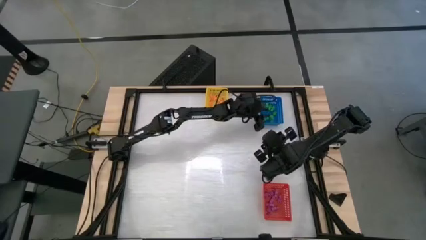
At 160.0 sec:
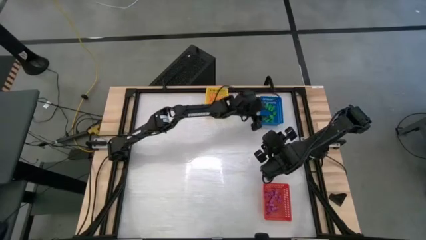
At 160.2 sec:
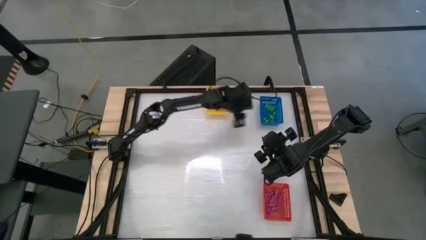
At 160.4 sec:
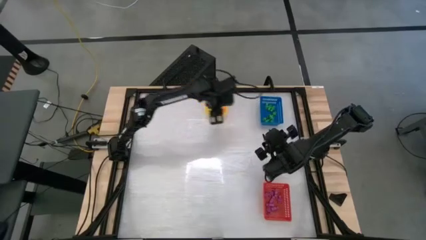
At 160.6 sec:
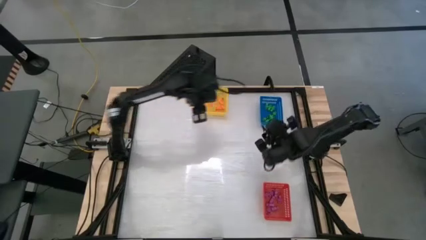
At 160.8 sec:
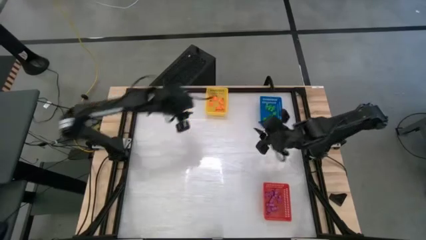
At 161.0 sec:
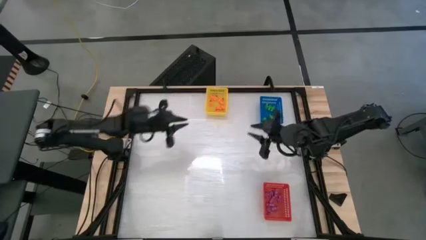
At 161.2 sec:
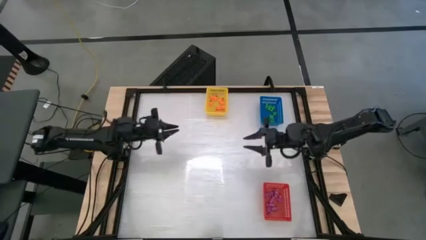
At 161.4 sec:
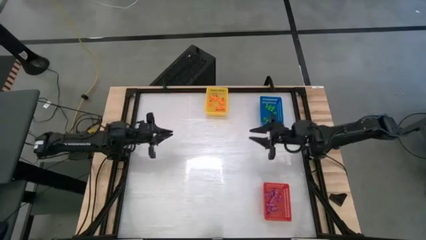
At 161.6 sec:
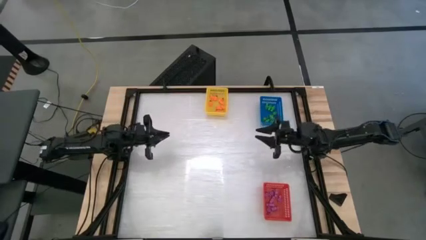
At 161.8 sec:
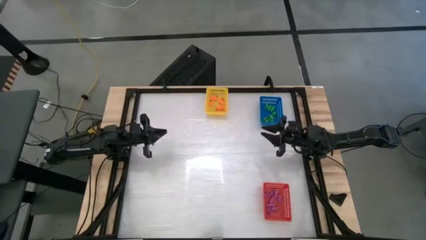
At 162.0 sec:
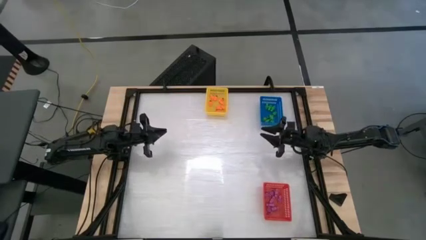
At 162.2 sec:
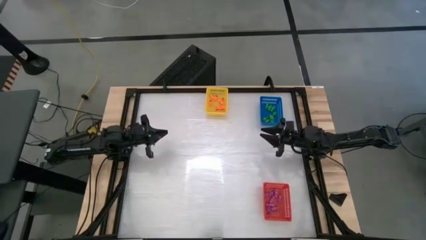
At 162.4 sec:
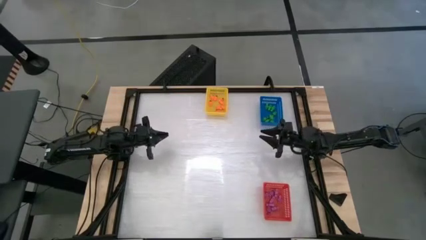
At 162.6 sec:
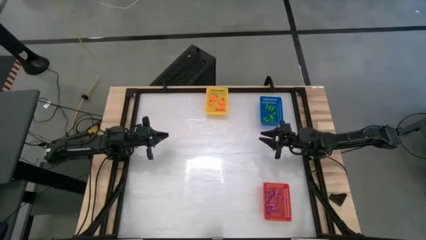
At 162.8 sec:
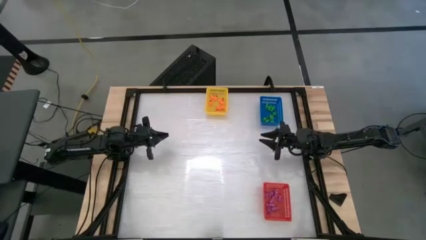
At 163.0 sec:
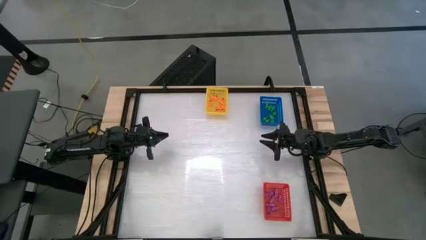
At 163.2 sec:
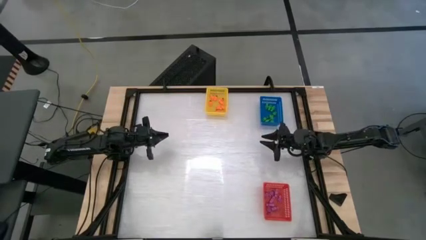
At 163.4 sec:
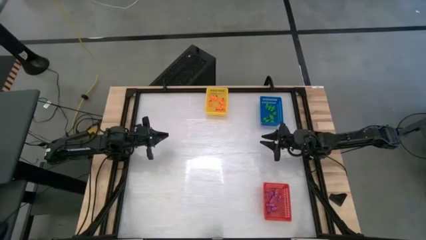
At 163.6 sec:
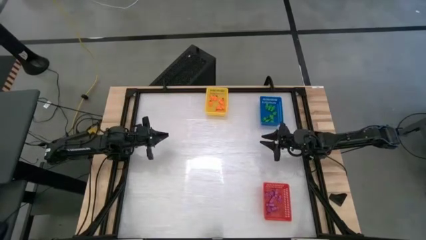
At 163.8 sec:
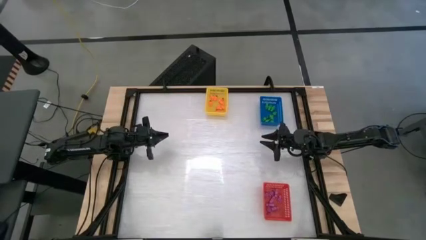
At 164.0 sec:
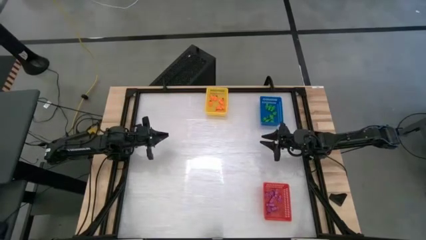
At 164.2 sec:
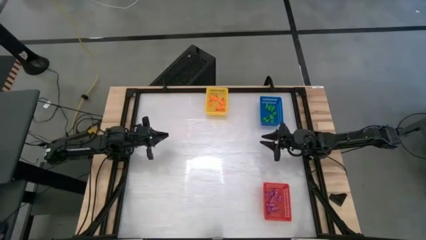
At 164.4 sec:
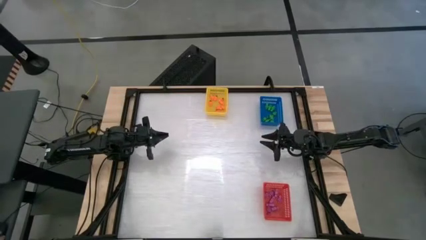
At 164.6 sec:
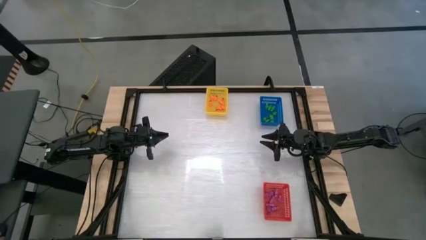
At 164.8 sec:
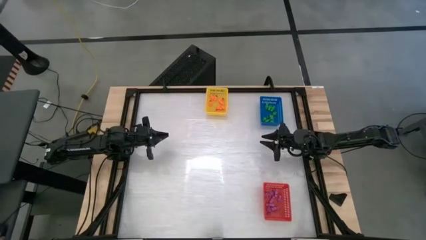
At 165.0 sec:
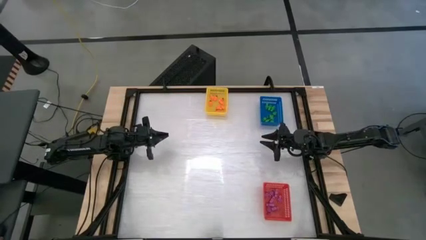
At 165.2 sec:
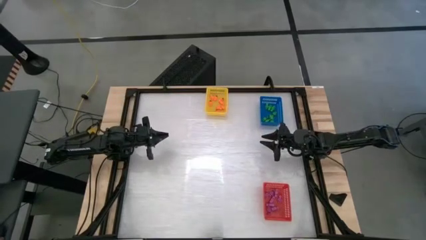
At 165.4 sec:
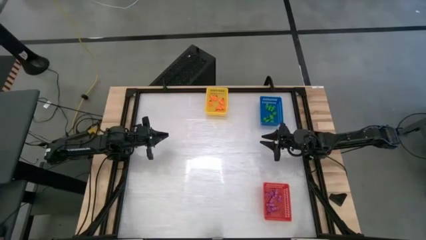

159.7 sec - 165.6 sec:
Task: Sort Halloween decoration
Return to Home Position

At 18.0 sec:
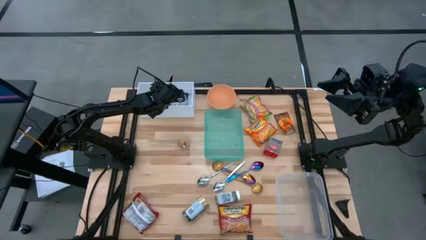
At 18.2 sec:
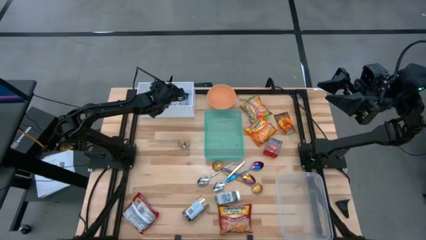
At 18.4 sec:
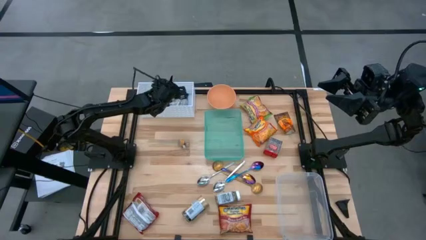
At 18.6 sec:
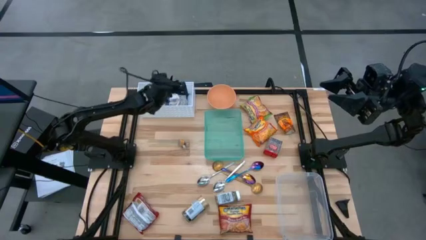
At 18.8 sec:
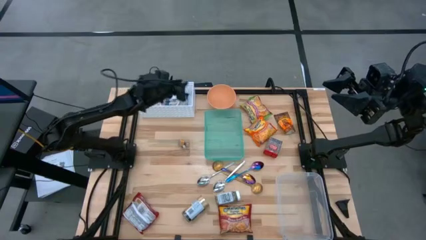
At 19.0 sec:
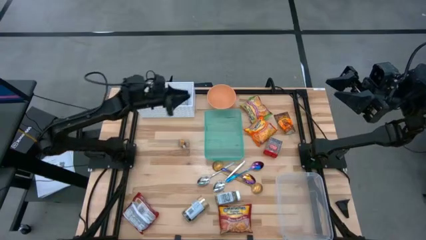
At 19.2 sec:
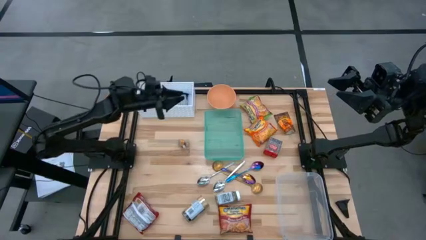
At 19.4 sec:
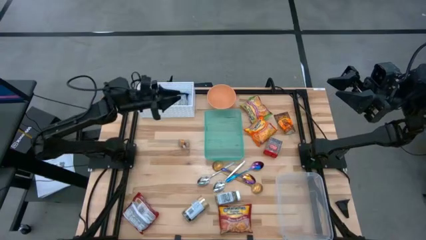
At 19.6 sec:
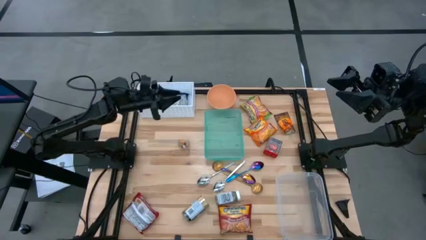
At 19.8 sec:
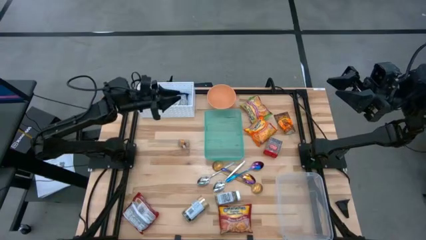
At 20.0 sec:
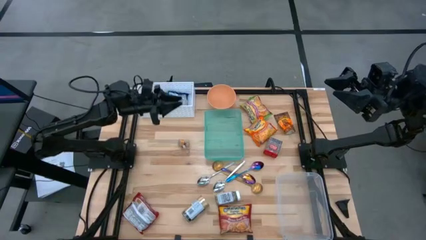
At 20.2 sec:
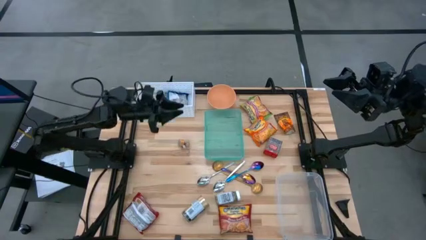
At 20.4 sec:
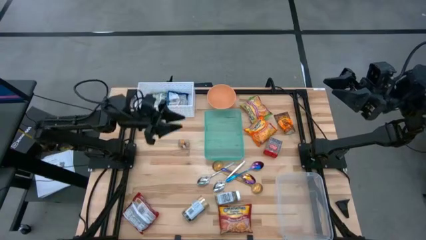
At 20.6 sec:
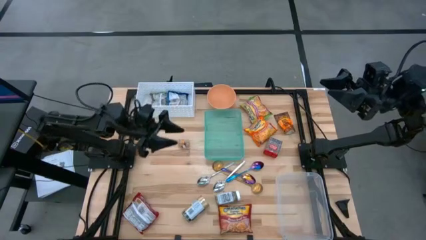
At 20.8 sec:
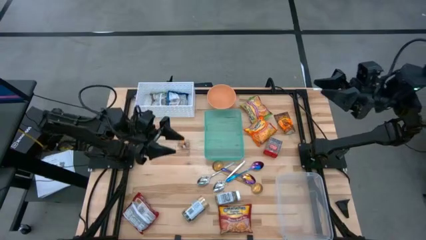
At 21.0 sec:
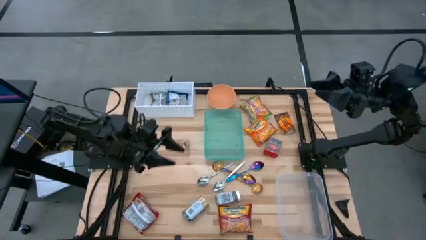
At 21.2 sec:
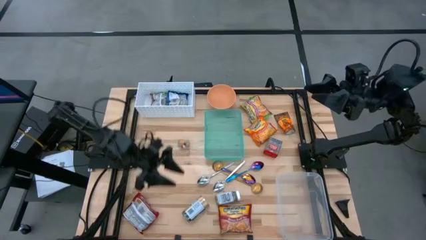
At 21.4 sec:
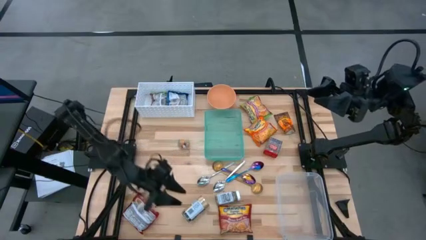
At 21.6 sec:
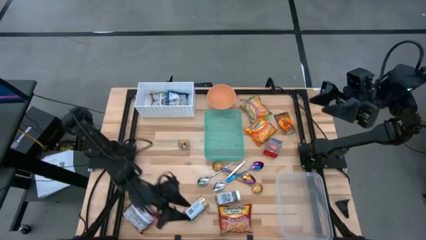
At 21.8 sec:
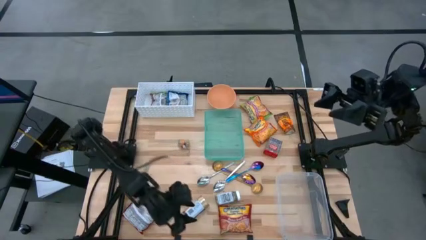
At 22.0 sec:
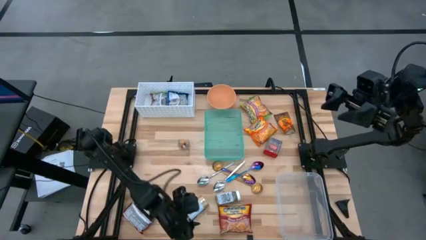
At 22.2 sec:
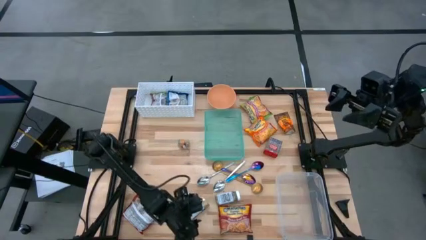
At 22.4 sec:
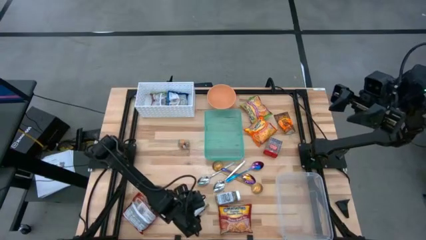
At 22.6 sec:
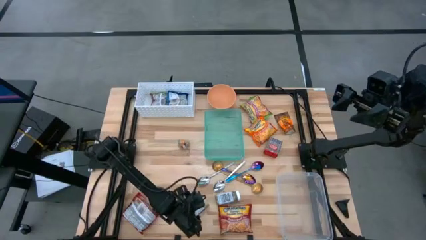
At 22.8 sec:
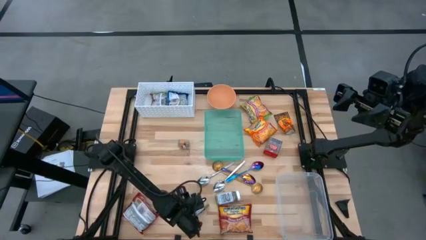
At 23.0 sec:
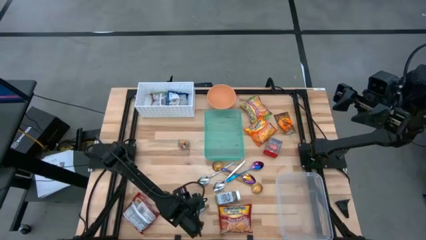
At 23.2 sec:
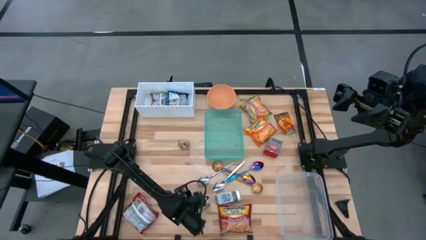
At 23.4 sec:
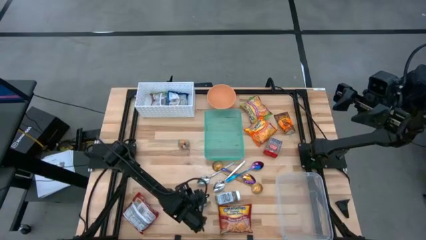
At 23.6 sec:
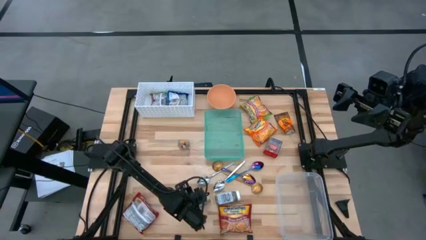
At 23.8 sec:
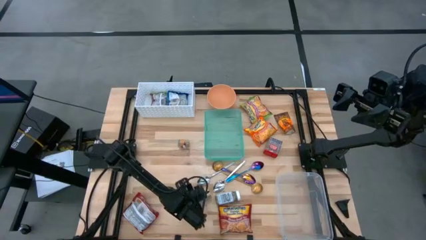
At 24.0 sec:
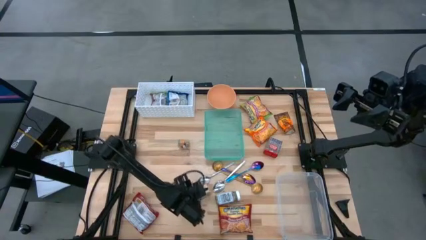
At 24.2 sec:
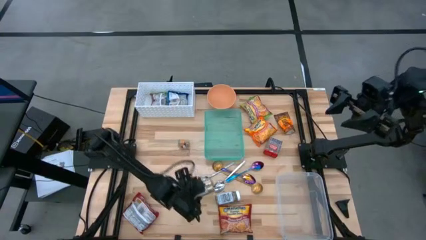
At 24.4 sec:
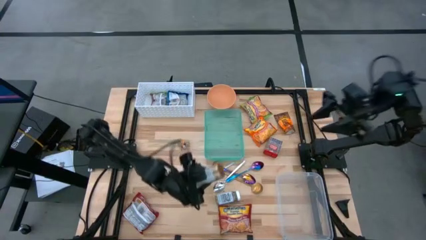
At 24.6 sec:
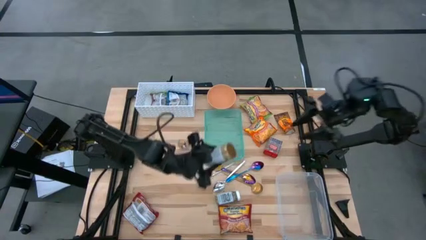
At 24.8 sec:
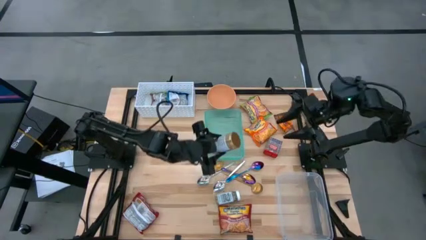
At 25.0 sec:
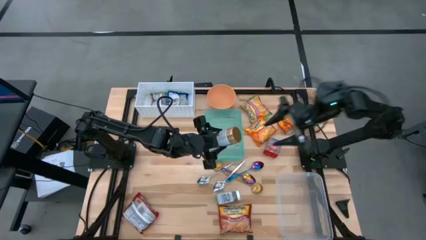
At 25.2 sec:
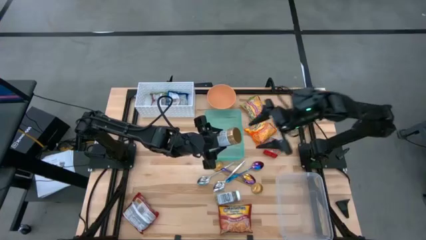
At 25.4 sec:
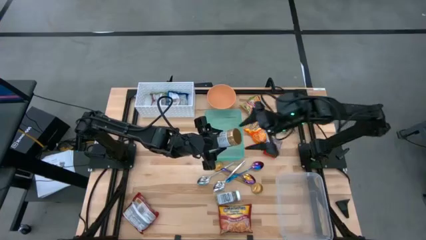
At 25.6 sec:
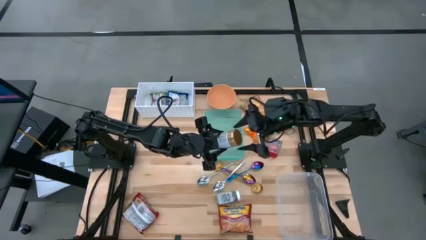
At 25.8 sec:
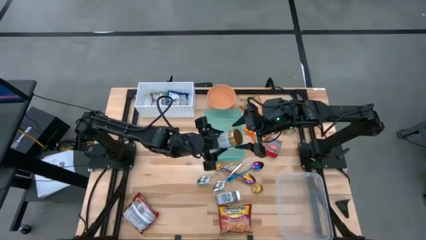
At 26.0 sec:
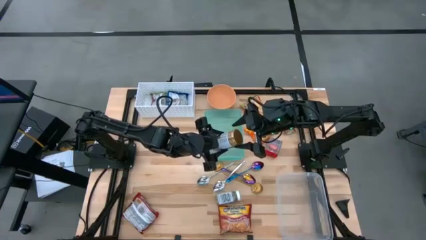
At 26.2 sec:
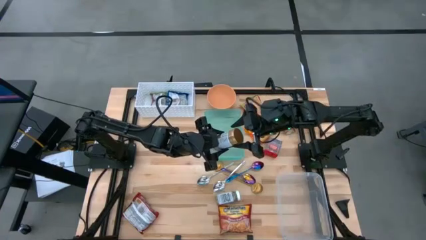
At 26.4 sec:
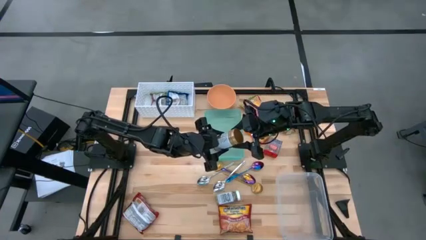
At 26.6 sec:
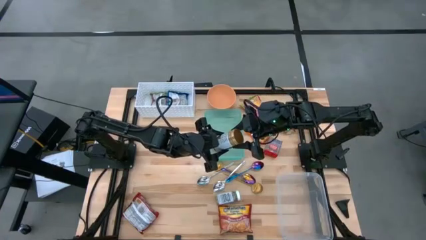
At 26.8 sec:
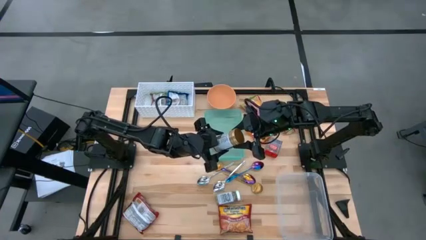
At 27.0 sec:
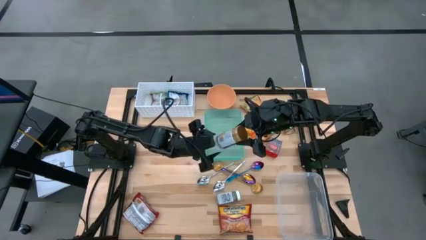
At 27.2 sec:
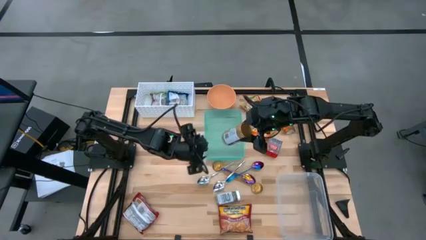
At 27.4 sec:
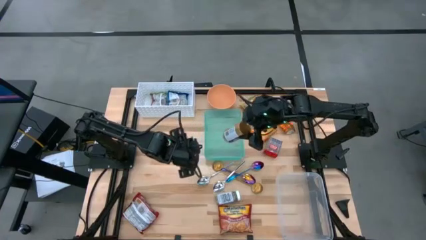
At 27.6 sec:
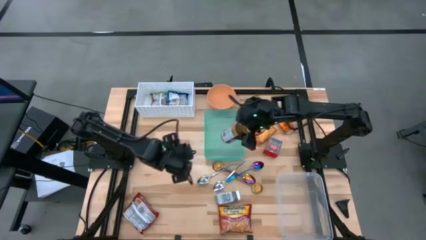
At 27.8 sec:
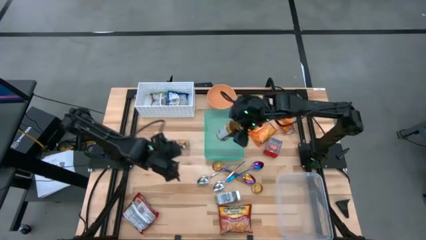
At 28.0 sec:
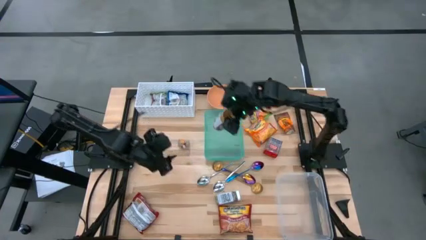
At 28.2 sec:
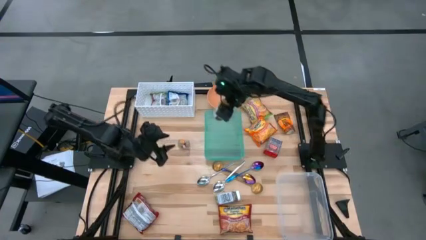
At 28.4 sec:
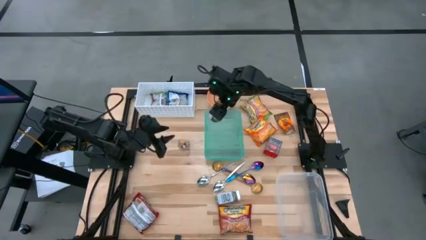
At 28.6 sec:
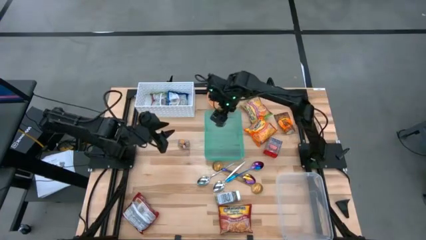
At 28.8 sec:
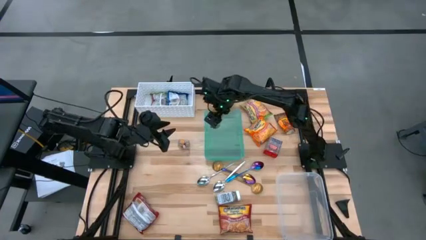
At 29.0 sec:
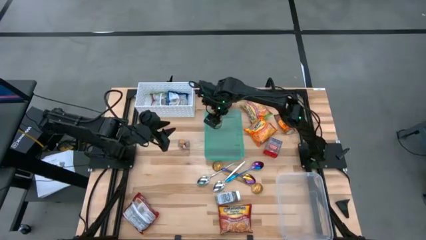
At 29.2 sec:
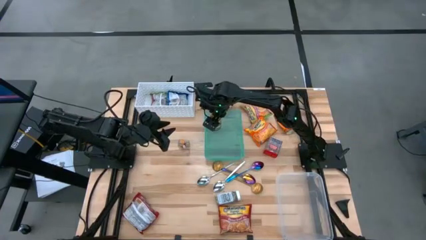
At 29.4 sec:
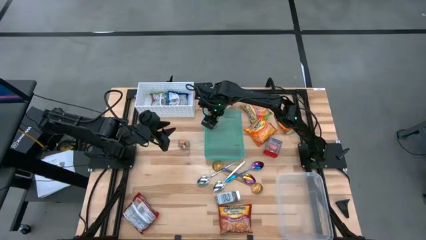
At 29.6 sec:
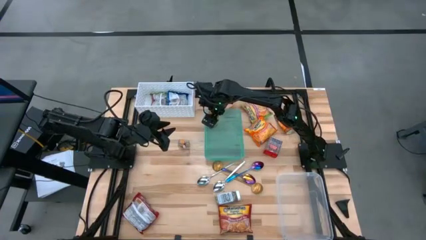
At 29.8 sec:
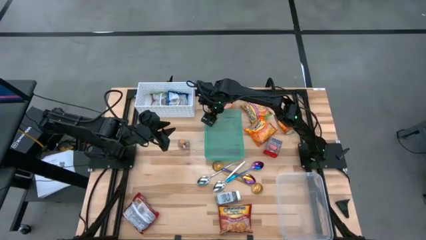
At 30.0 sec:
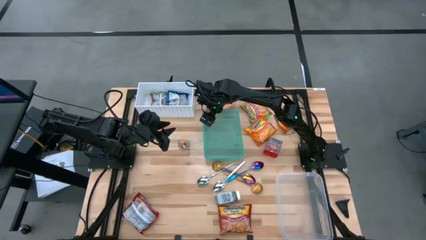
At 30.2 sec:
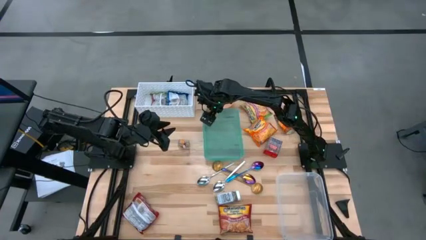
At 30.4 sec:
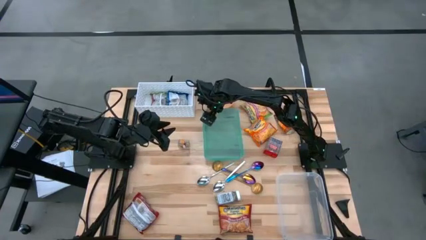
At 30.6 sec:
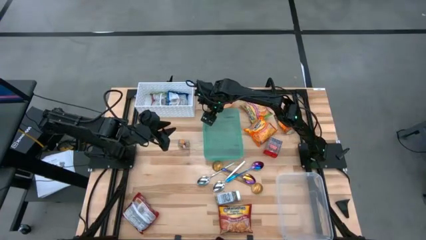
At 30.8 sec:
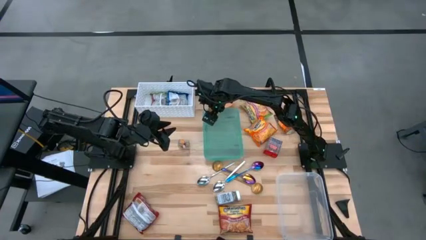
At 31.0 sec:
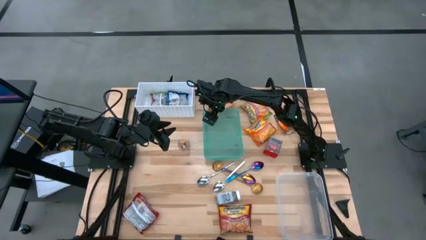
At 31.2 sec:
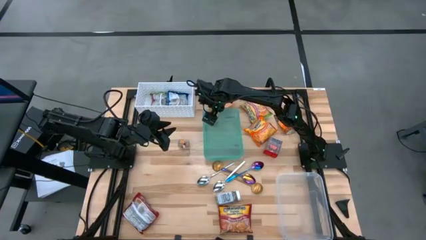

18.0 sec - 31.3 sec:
Task: Pick & Place Food Item
Put the gold seasoning into the blue bin
